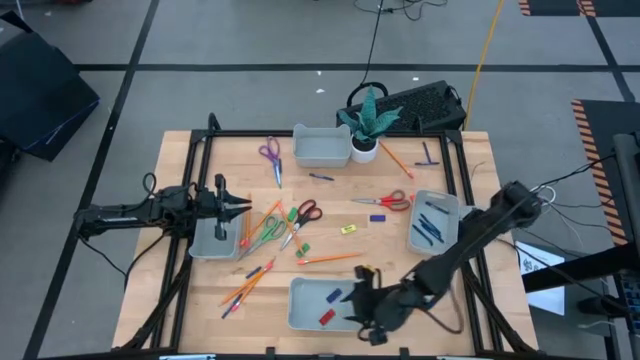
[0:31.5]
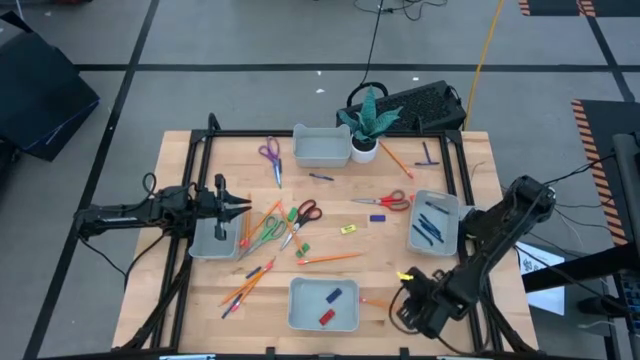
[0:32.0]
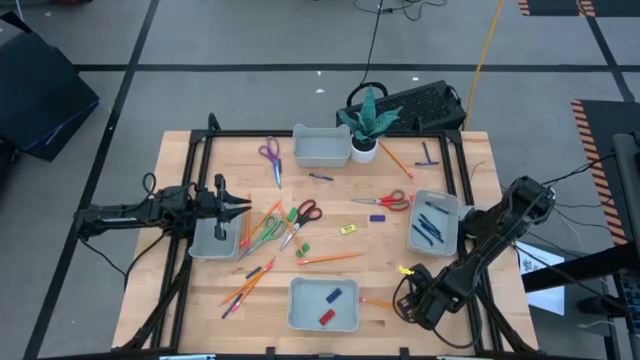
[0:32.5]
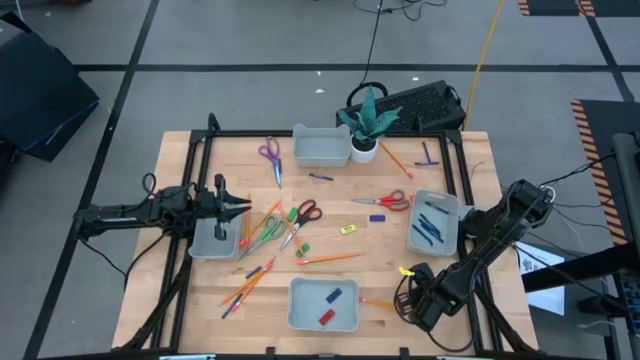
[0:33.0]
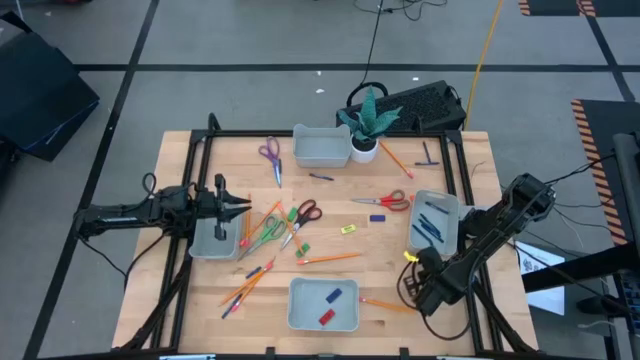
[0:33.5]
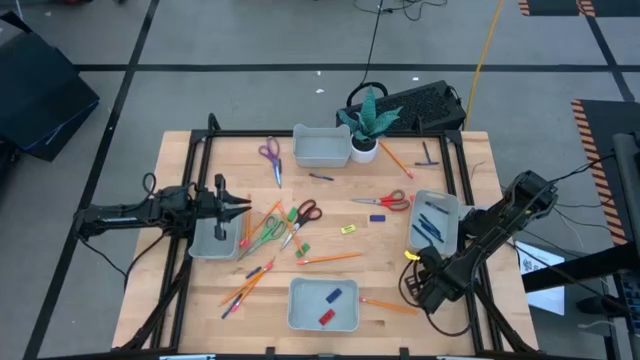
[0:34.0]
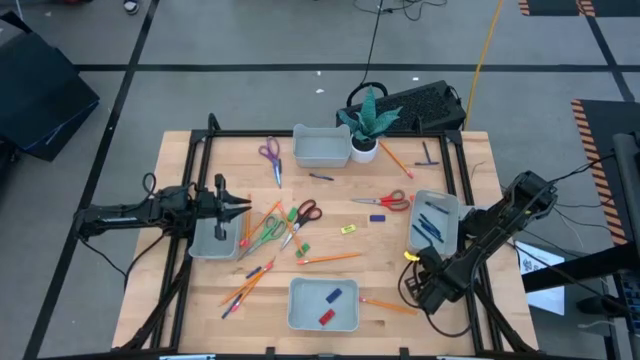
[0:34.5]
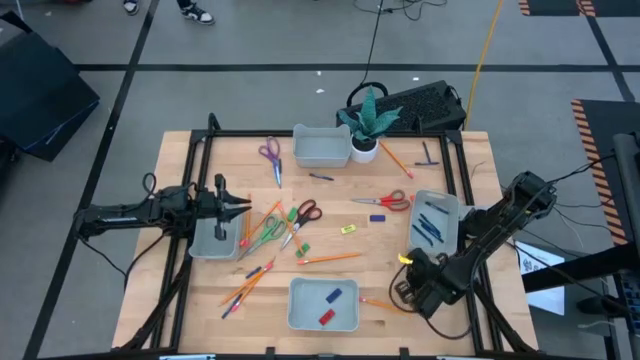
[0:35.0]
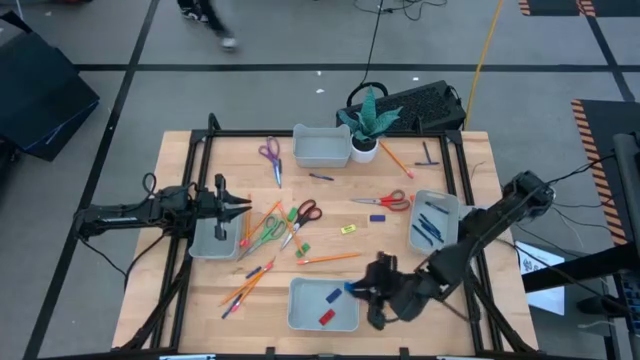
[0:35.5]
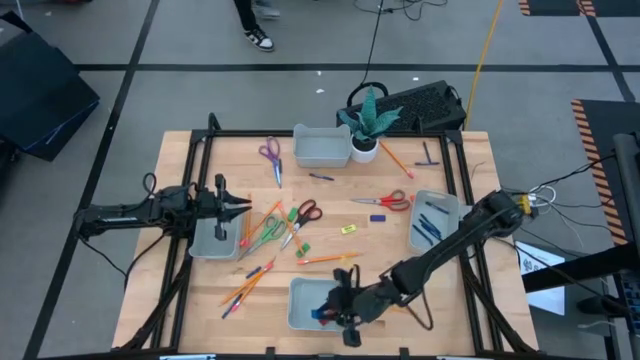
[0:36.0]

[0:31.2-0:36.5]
Task: Sort crayons/erasers/pens/pencils in bins
Put the blue eraser into the bottom gray bin

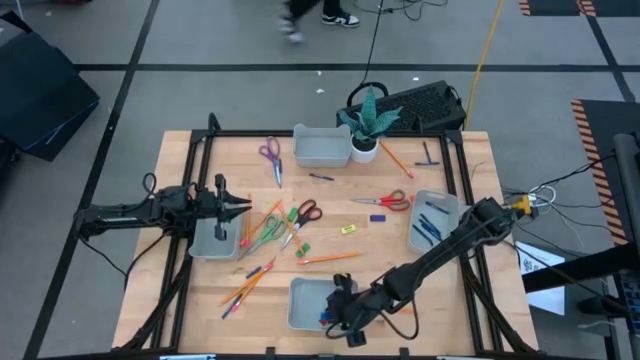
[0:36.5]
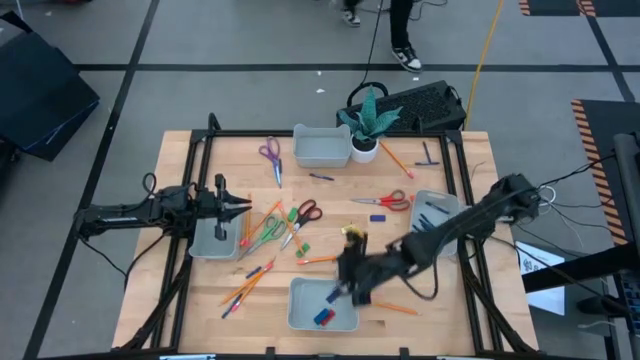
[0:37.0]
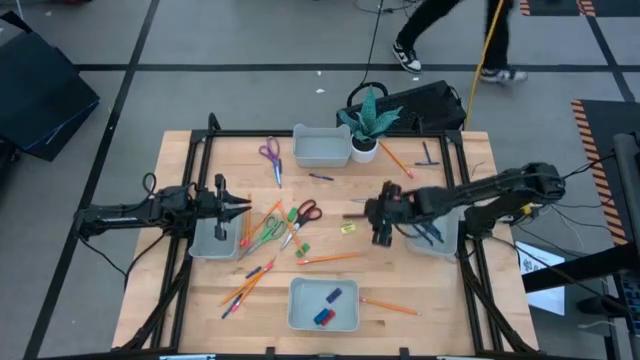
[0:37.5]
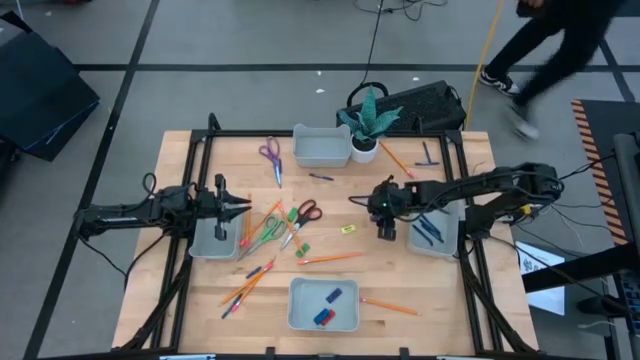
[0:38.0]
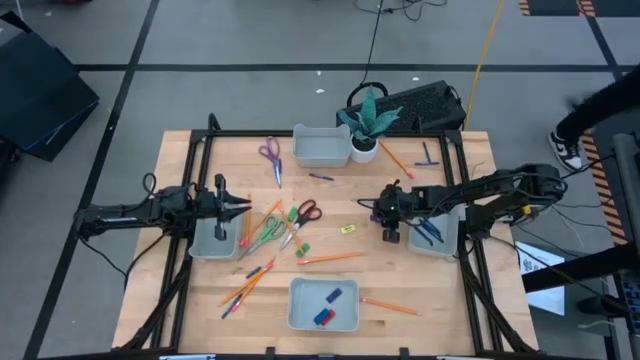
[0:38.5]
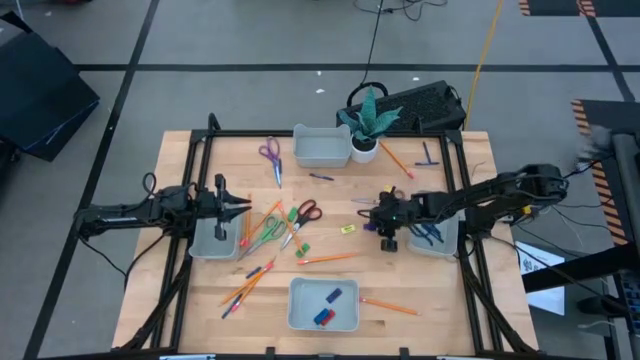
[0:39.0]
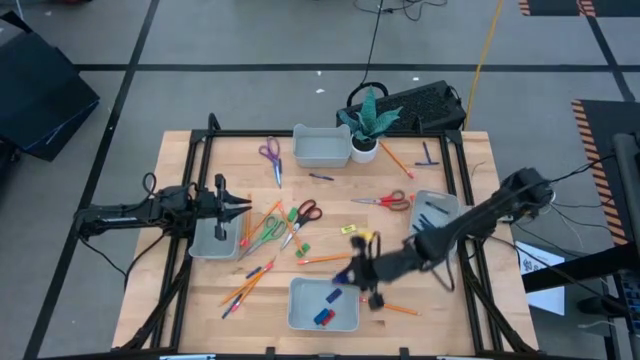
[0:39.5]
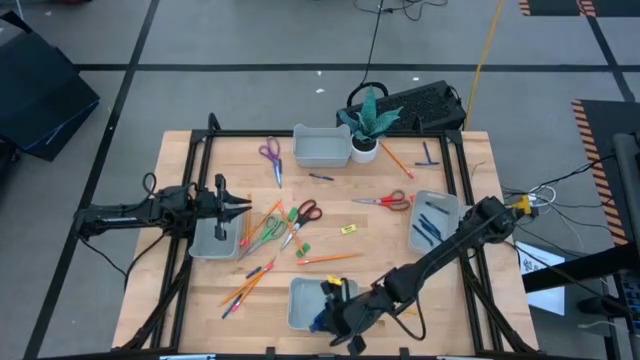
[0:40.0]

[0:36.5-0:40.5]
Put the dark blue eraser into the bottom gray bin

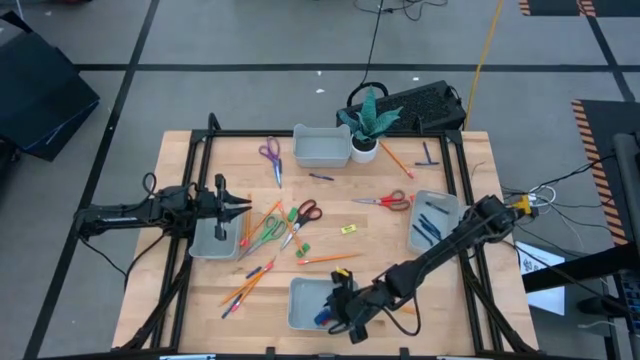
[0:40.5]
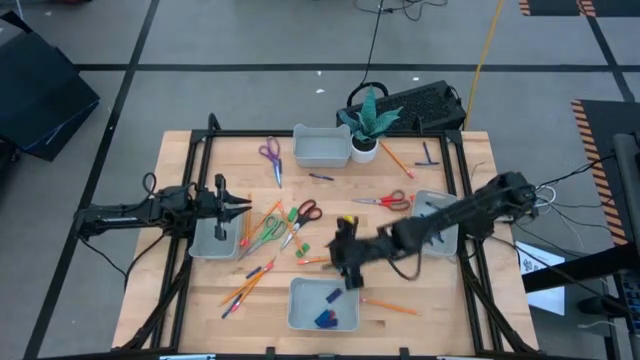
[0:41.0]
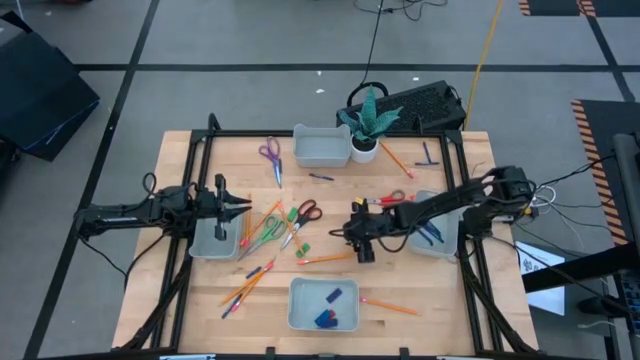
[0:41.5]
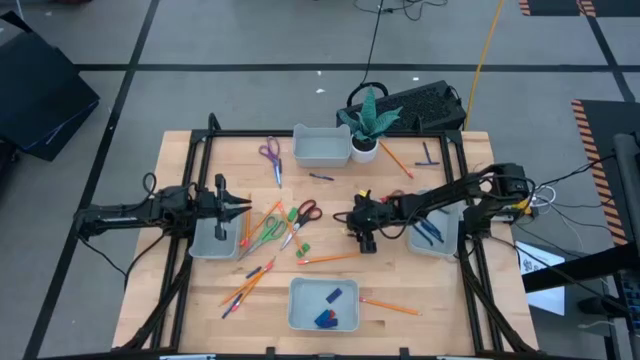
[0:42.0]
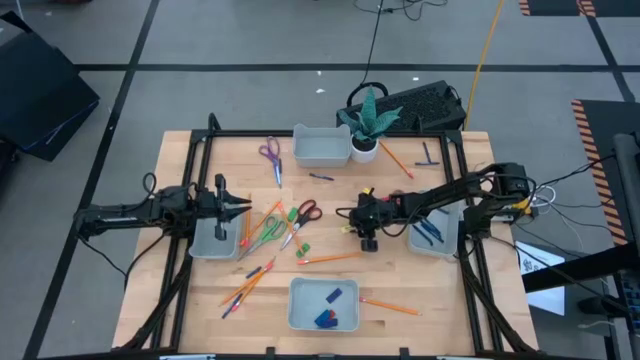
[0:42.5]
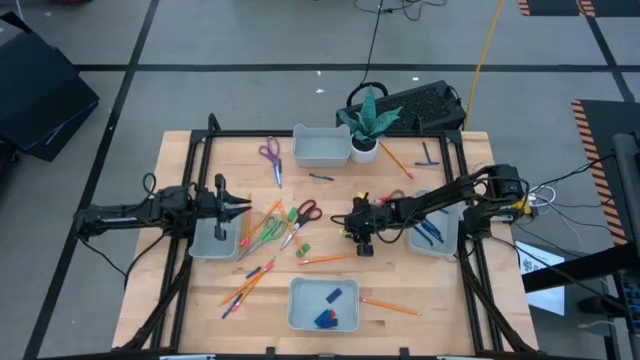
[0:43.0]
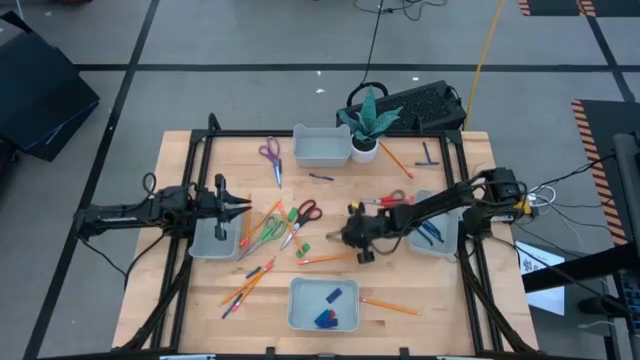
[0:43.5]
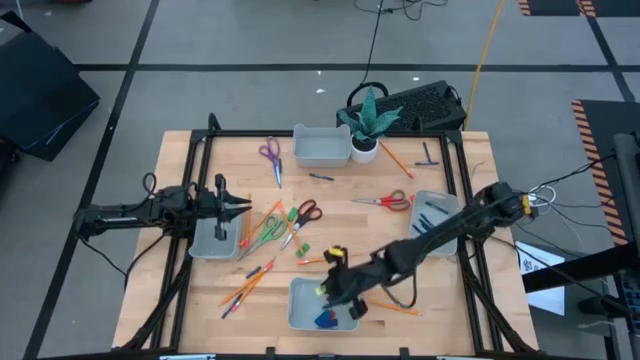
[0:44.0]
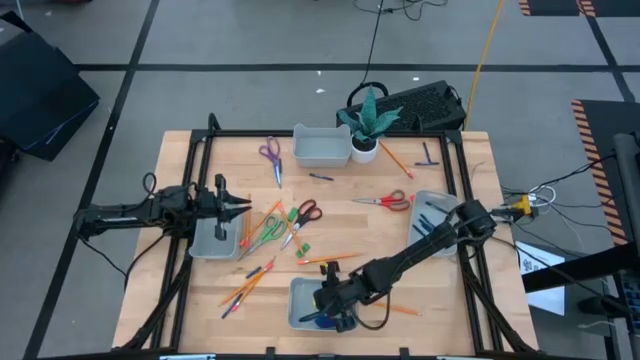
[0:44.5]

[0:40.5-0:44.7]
Put the yellow eraser into the bottom gray bin

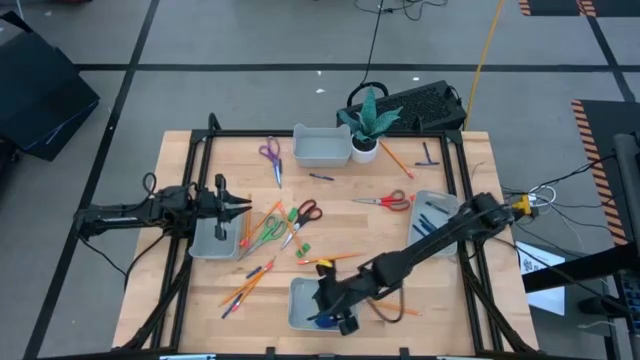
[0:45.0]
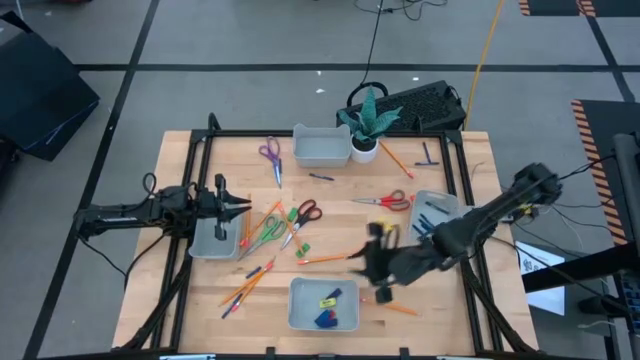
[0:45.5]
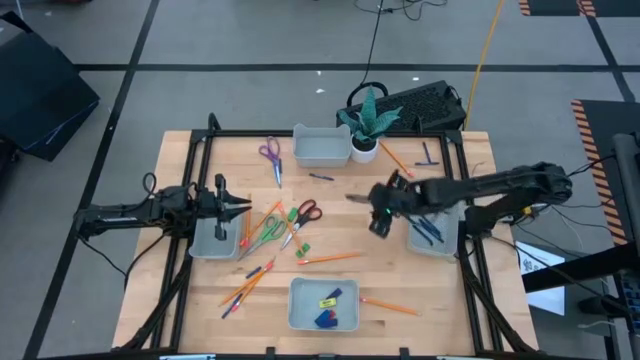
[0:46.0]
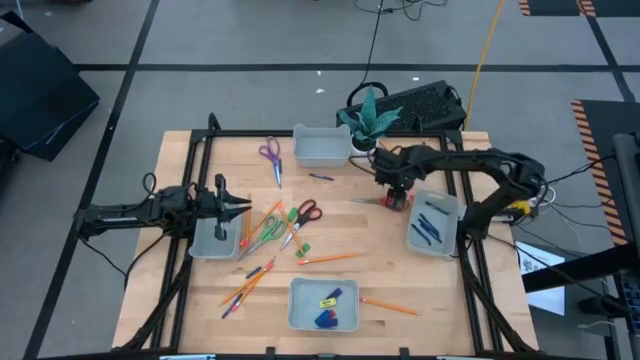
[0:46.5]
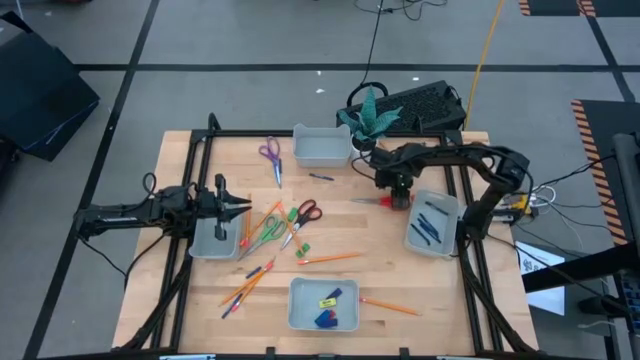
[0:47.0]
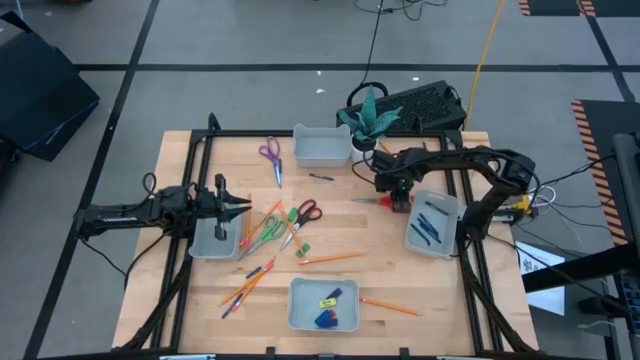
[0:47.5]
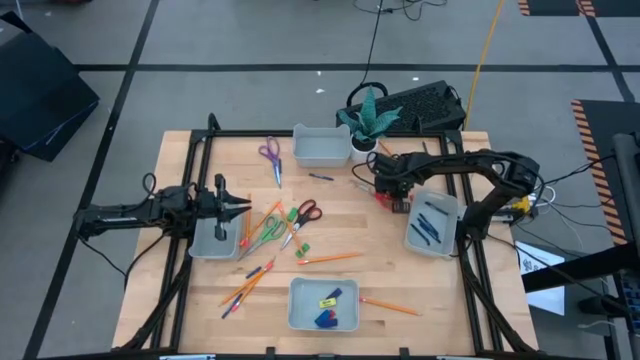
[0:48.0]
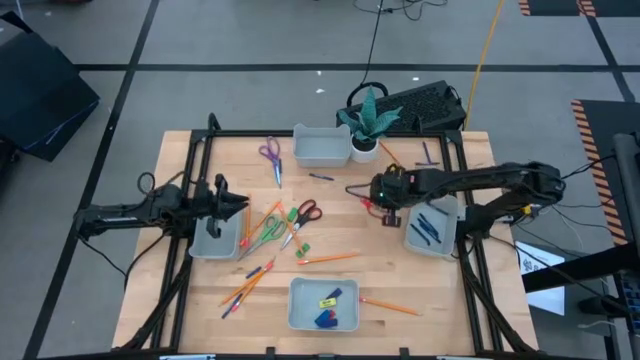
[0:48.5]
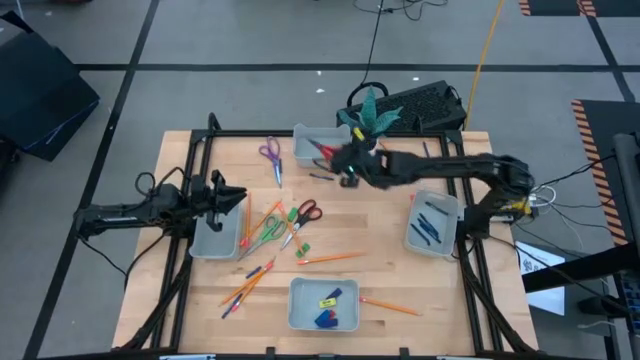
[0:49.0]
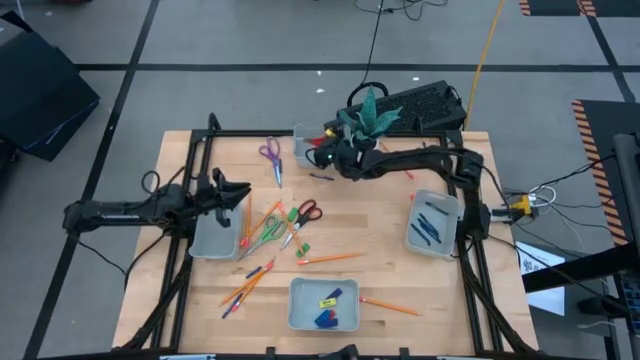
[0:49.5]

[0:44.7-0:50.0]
Put the red scissors into the top gray bin

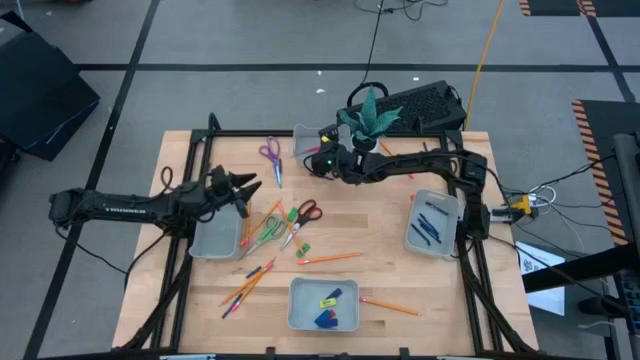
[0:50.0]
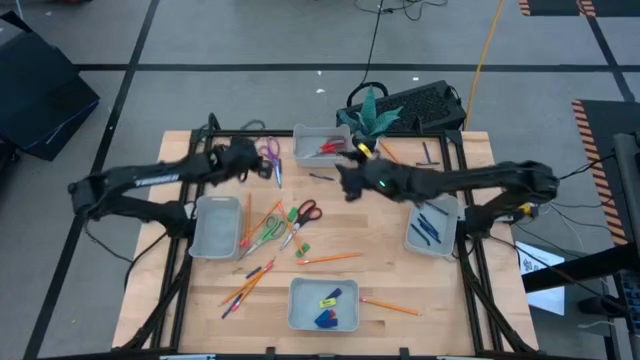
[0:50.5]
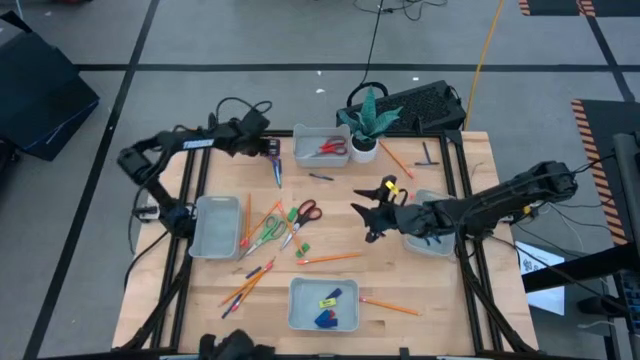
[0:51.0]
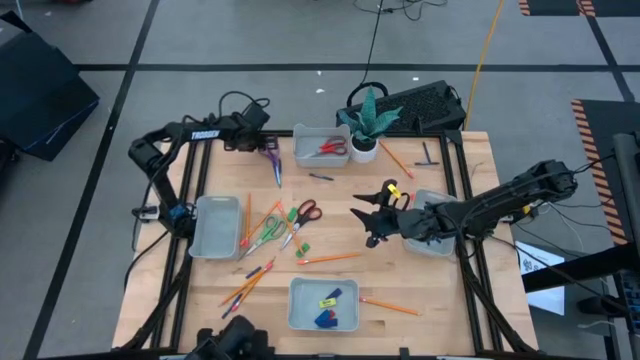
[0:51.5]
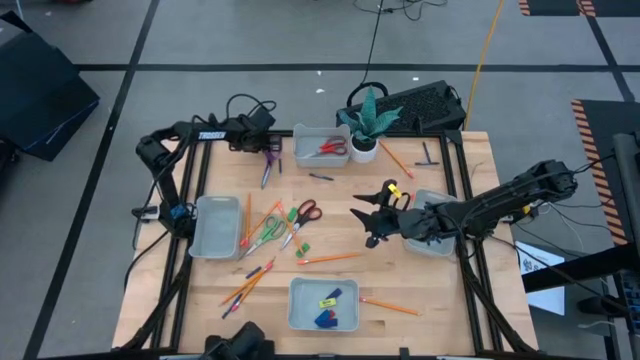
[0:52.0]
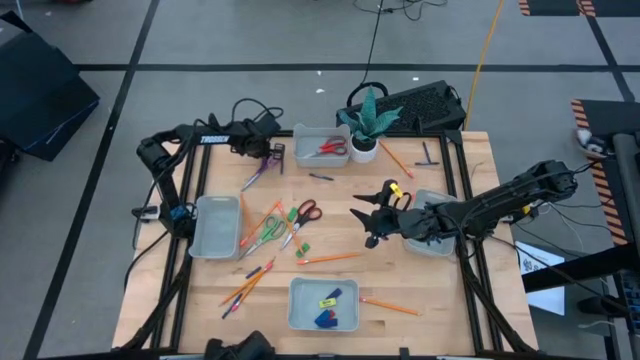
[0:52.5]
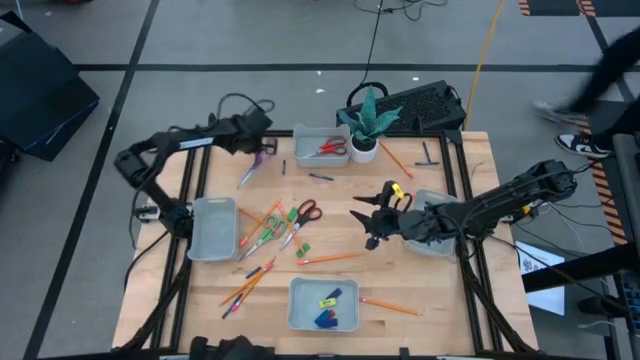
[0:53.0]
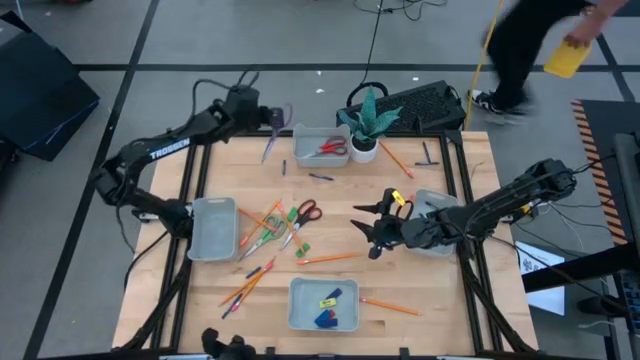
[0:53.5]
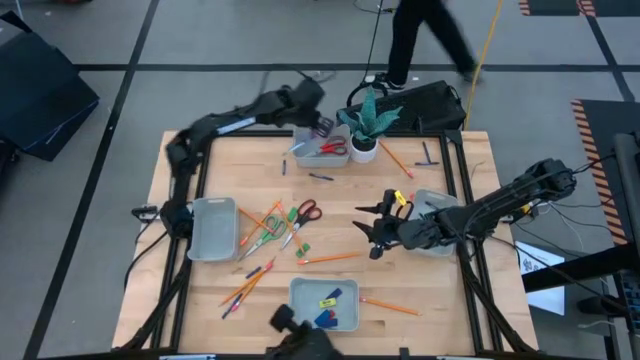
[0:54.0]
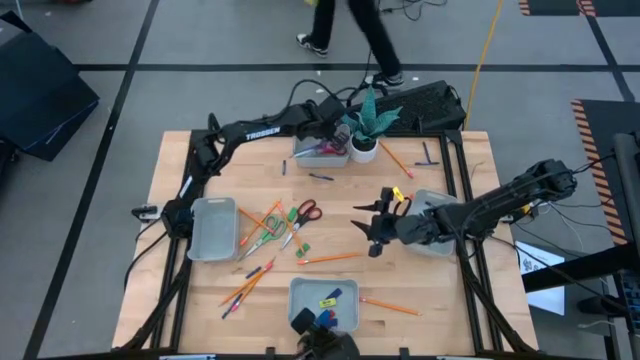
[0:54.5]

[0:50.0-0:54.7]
Put the violet scissors into the top gray bin
